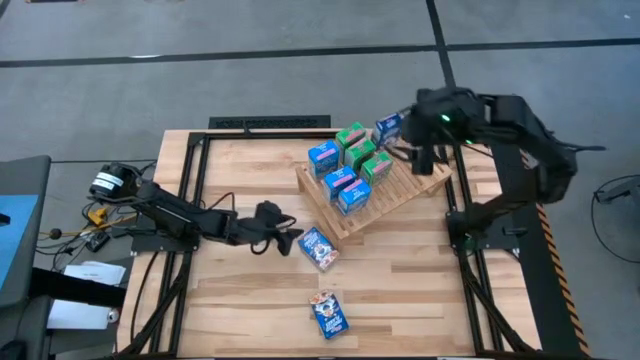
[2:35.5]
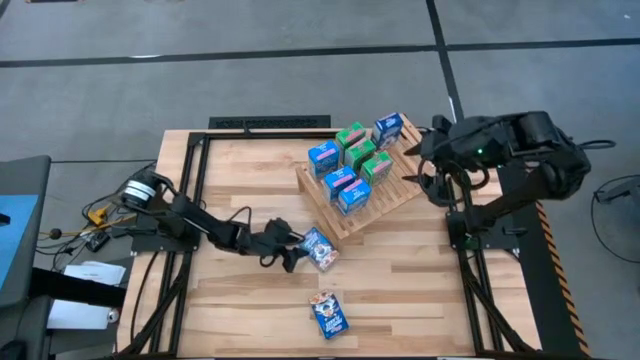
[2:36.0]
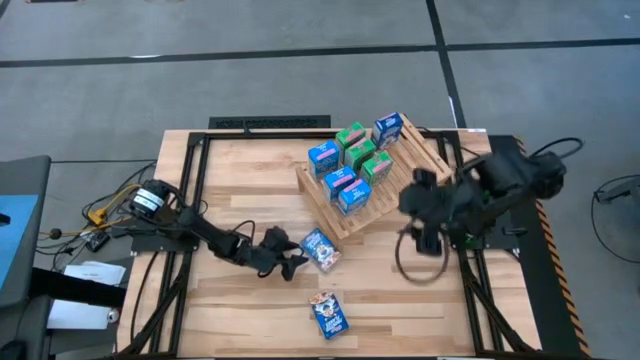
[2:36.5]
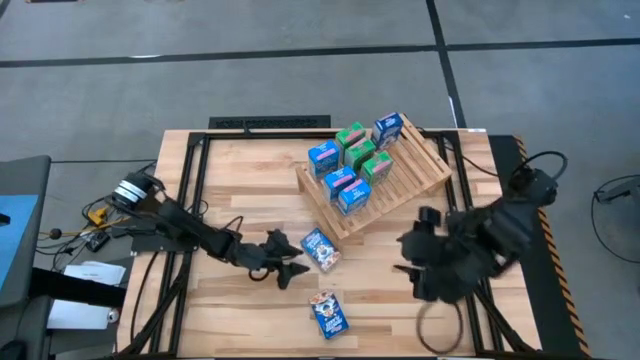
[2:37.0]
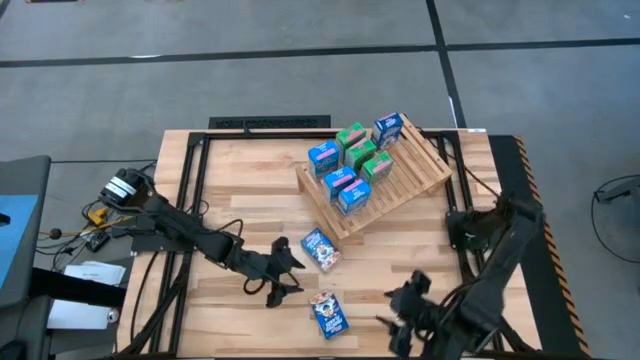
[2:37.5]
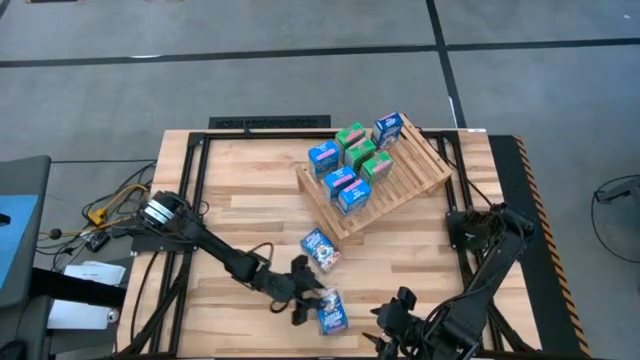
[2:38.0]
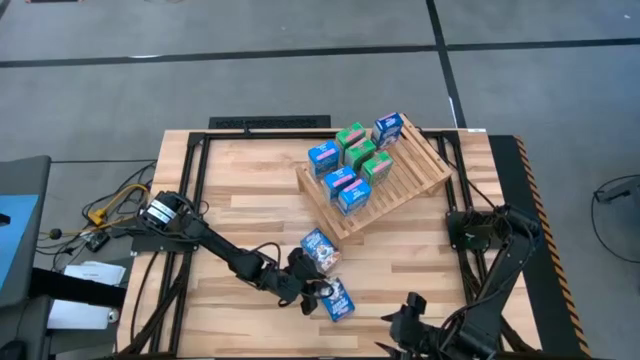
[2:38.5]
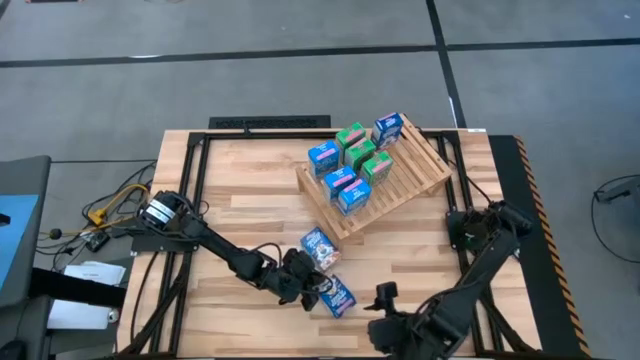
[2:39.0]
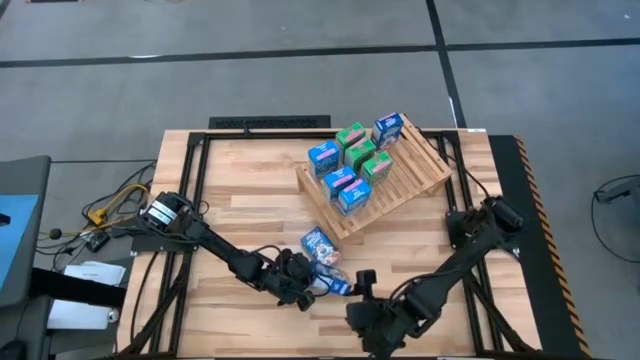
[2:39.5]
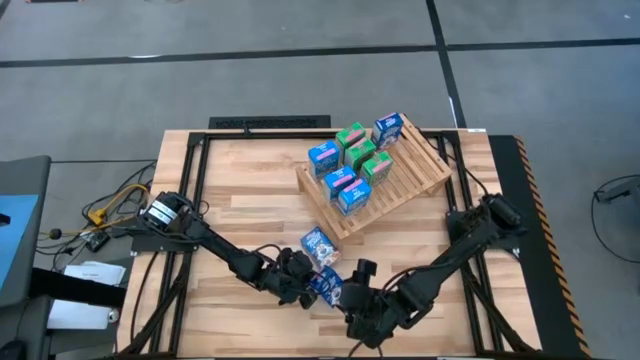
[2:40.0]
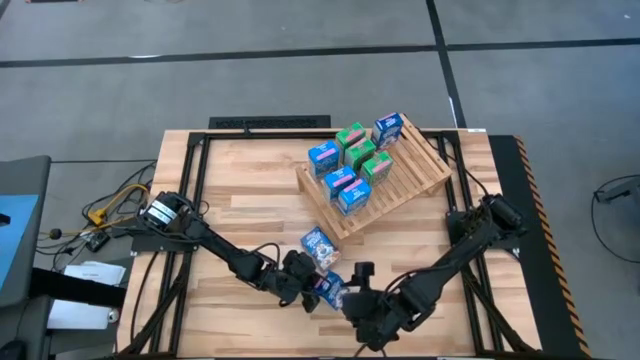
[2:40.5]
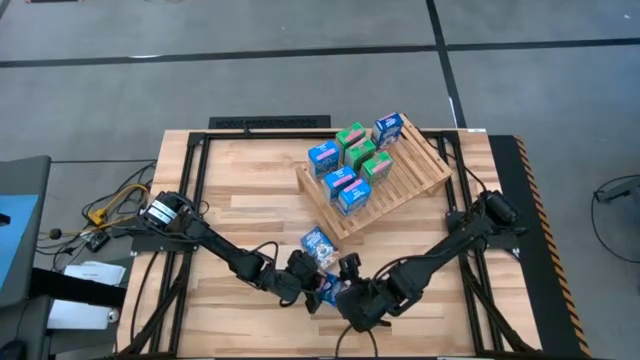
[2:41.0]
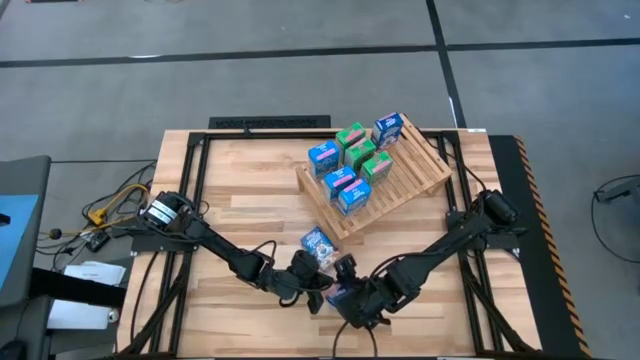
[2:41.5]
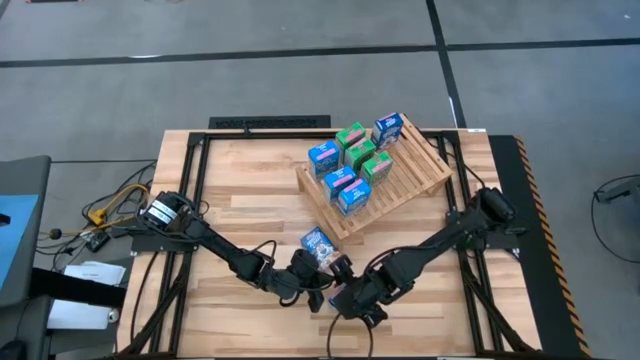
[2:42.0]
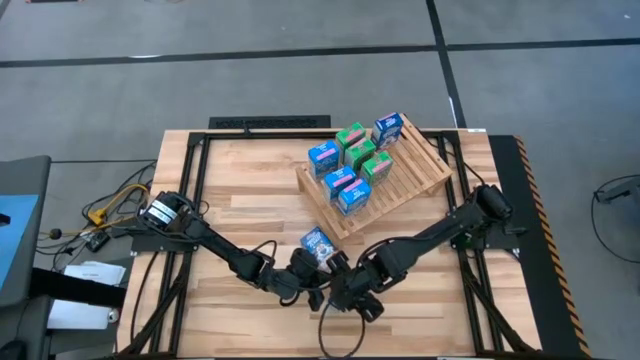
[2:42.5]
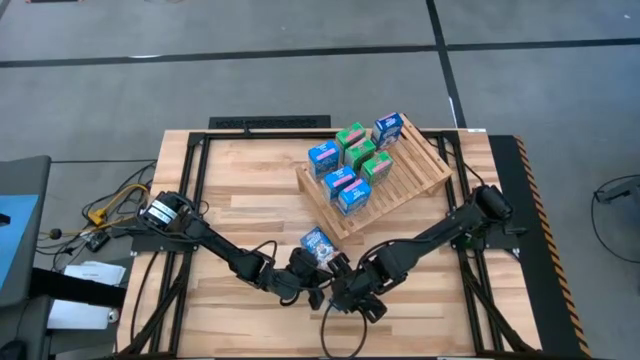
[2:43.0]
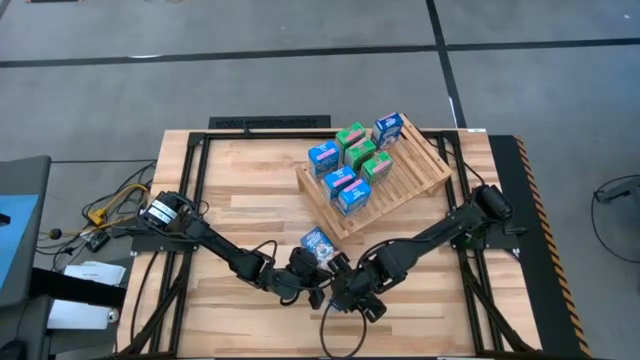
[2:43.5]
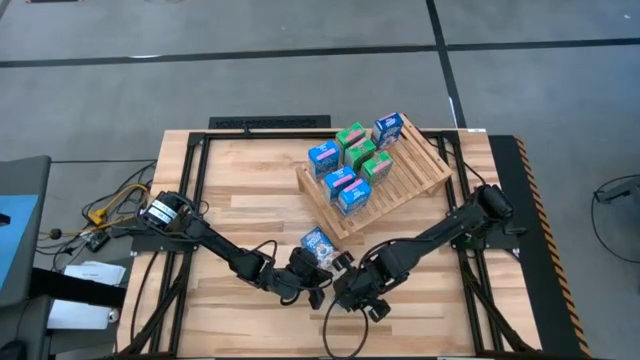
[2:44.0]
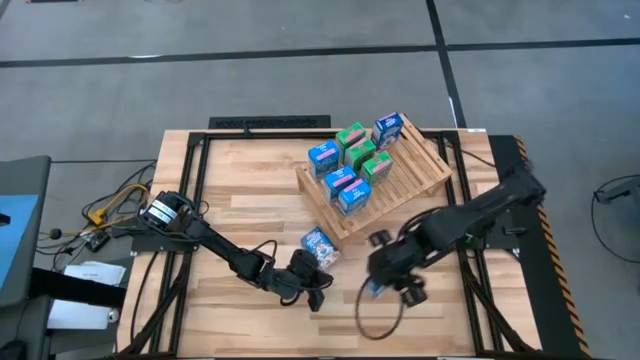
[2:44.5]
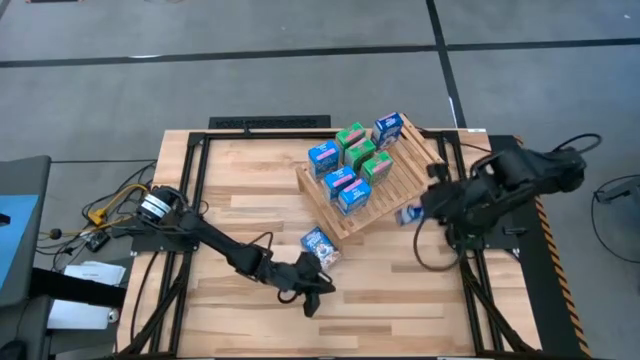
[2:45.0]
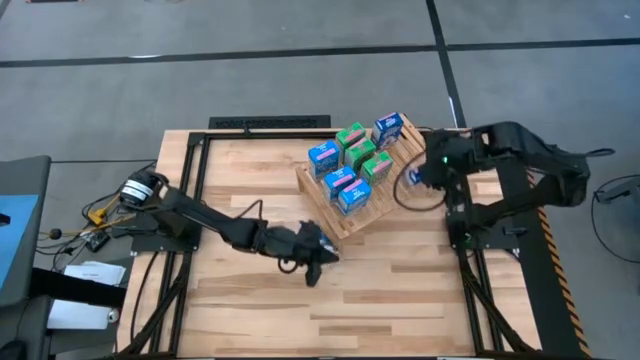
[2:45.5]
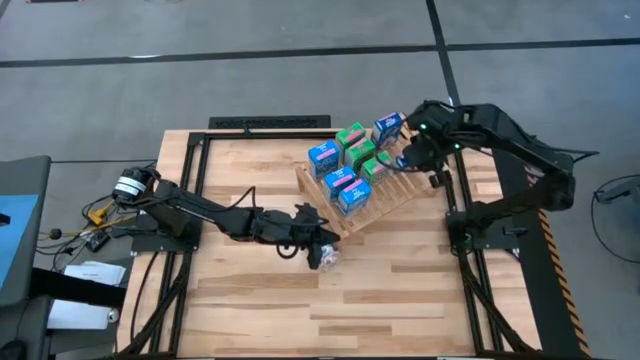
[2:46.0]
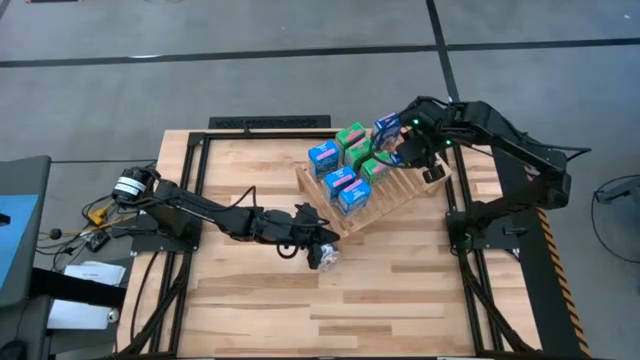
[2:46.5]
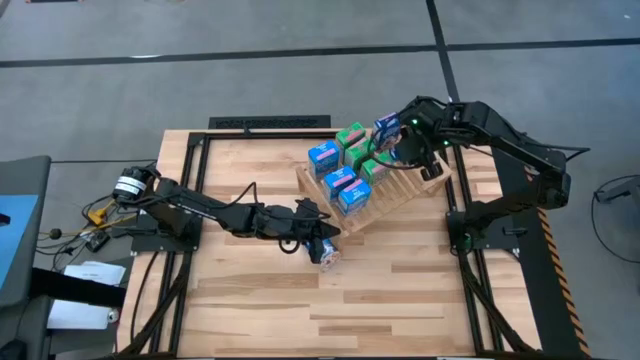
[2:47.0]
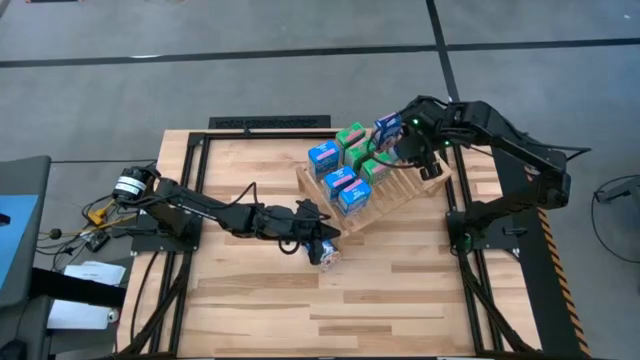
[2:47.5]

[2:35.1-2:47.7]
Task: Stack cereal on shelf
Put the bottom blue cereal align with the other blue cereal box on the shelf

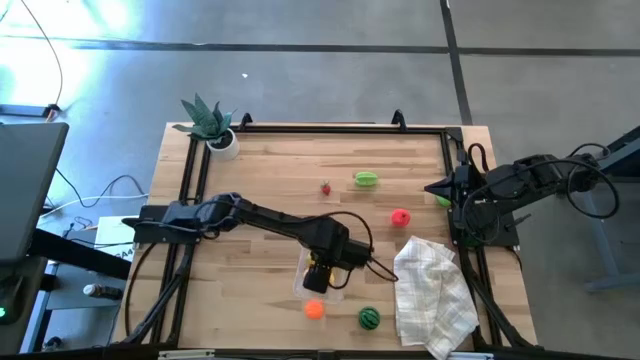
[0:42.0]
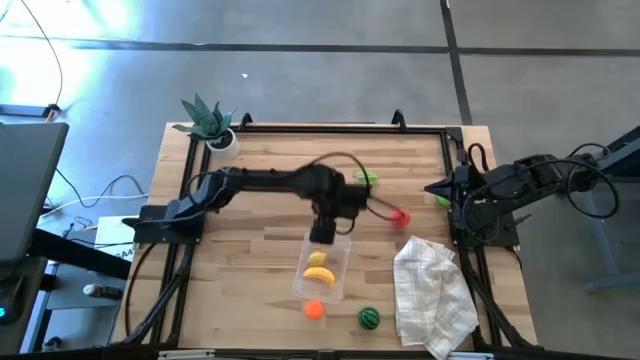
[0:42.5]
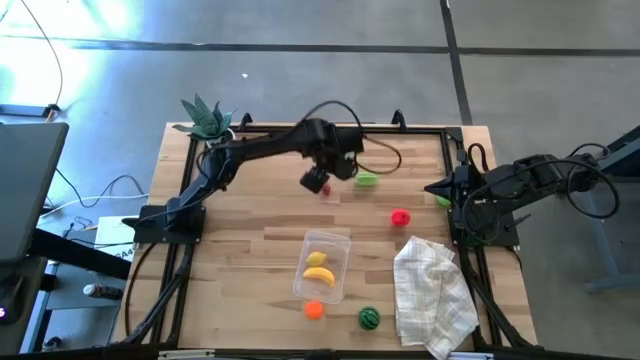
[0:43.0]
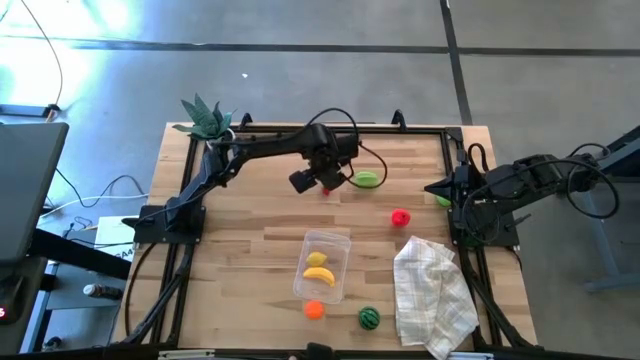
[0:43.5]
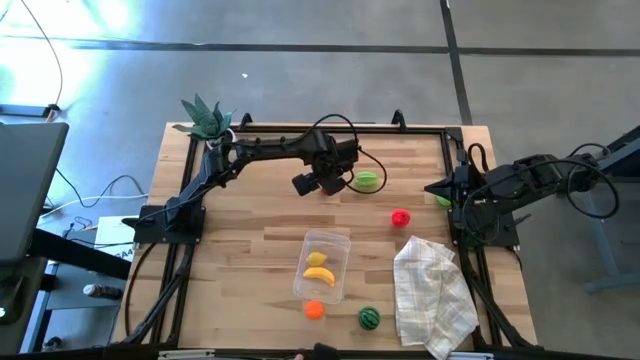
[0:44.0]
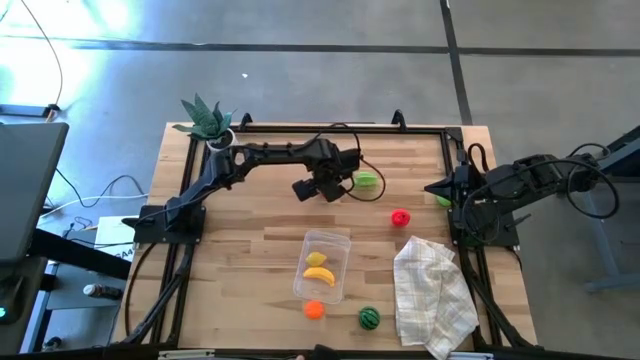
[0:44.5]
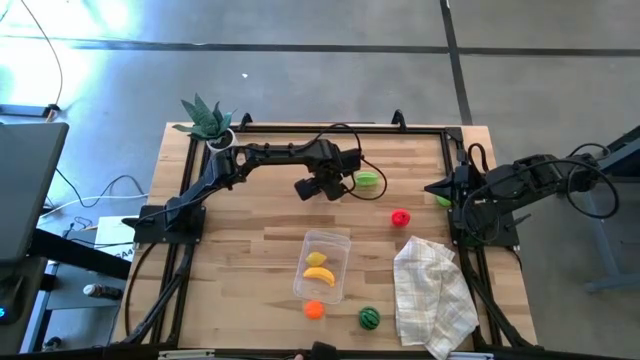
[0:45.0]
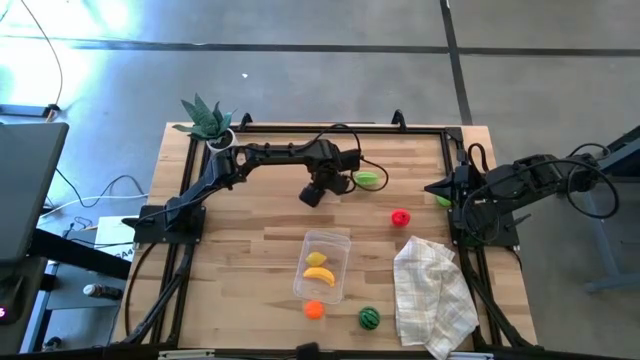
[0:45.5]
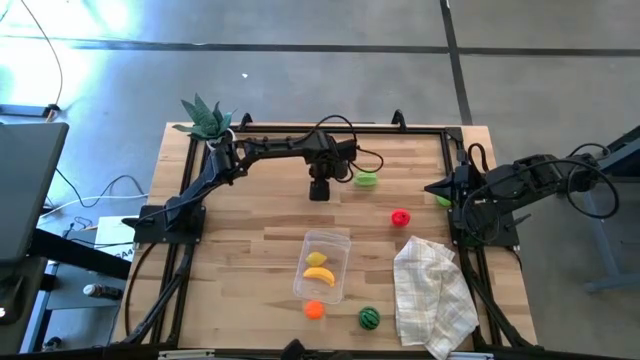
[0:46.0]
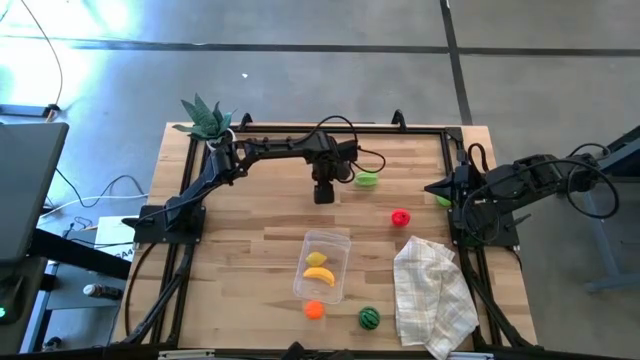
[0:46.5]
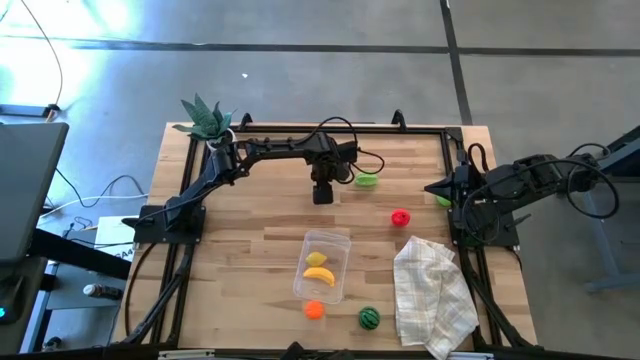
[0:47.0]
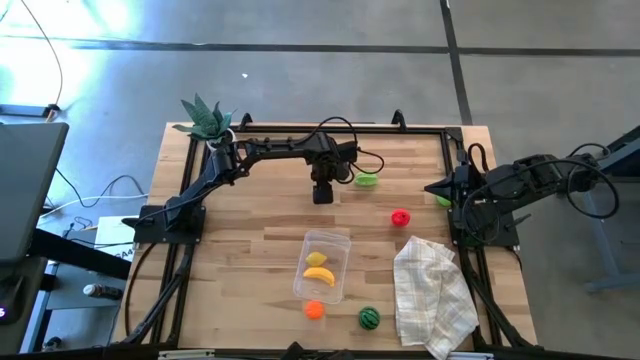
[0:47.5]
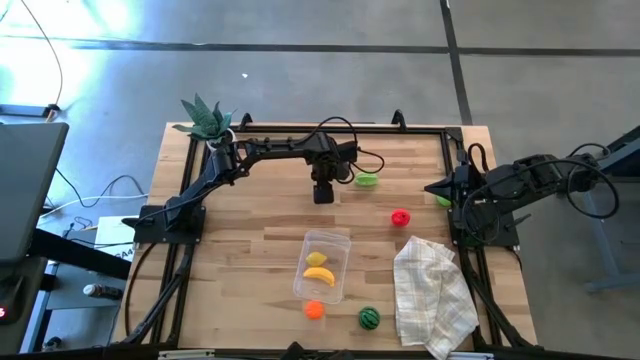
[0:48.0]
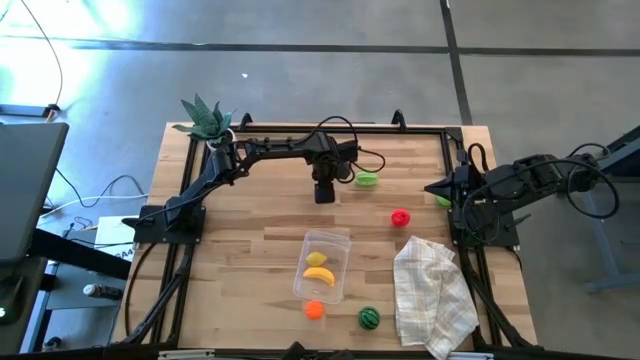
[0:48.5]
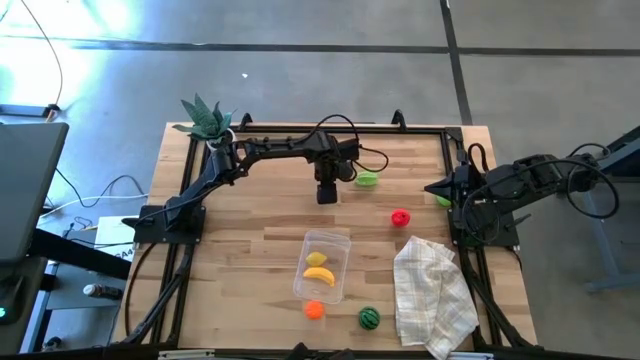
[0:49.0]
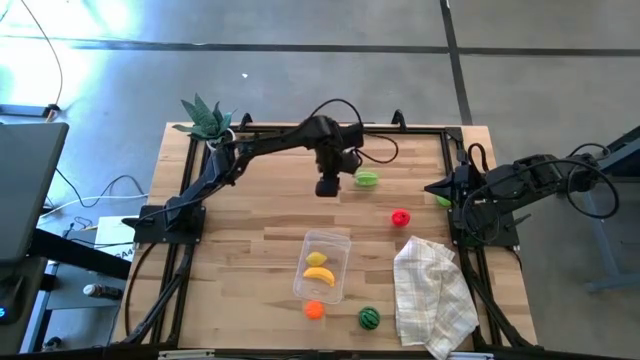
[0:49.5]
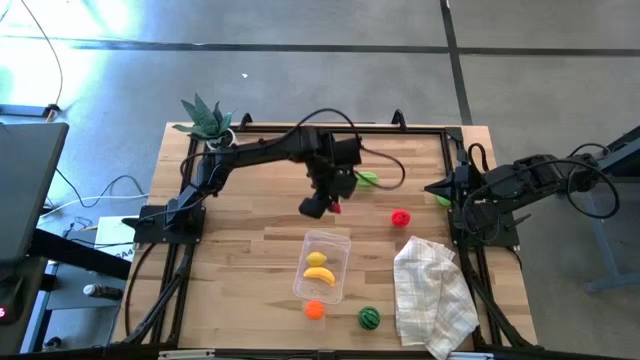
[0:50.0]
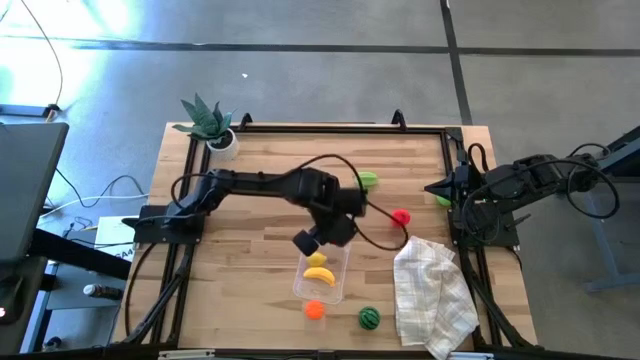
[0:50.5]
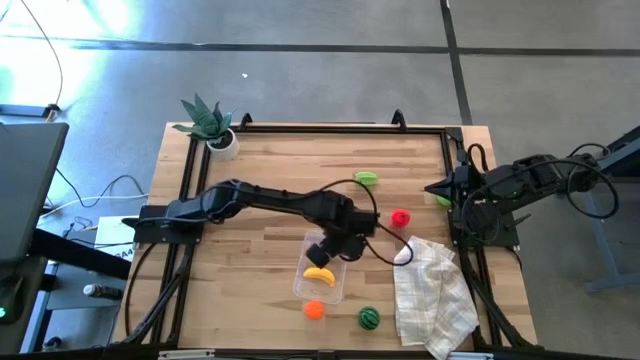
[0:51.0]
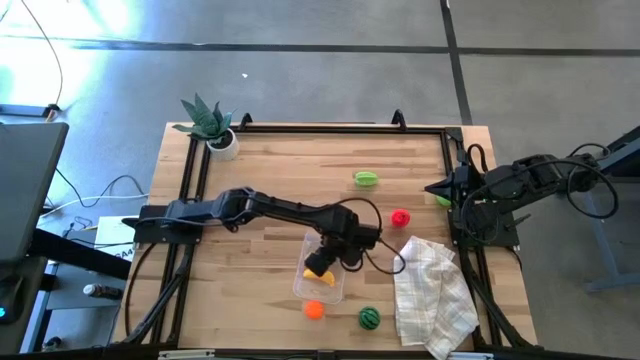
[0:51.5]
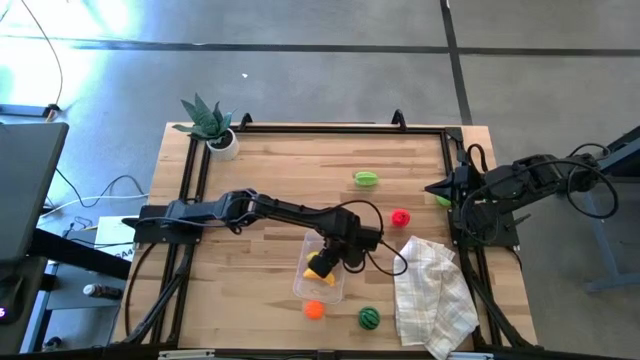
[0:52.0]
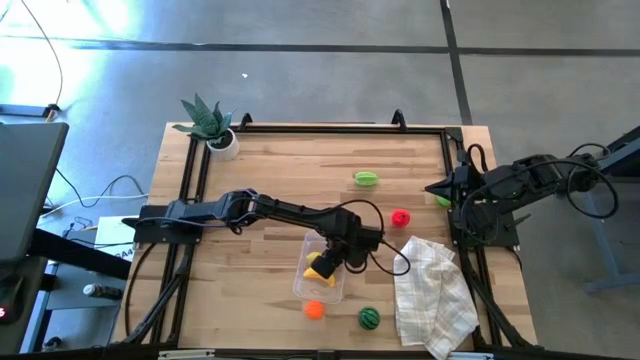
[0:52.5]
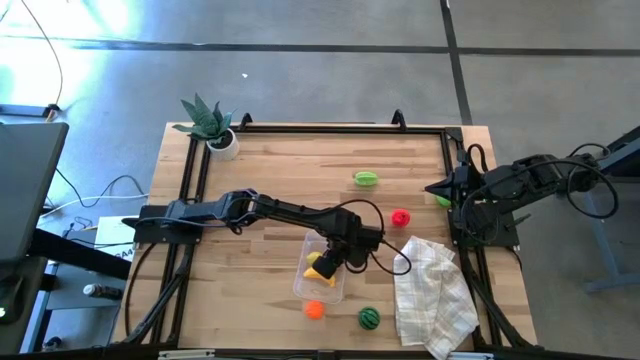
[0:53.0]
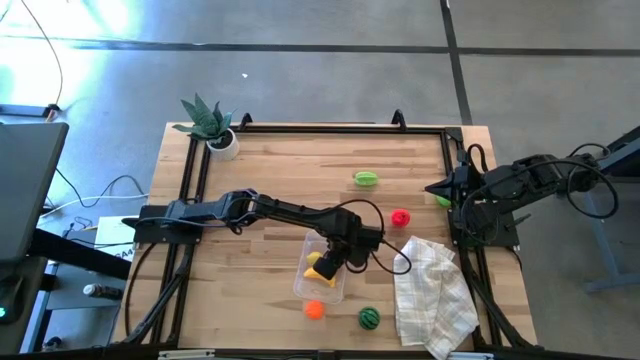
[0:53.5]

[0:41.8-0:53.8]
Task: Pick and placing Produce into tupperware
Put the strawberry into the transparent bin
